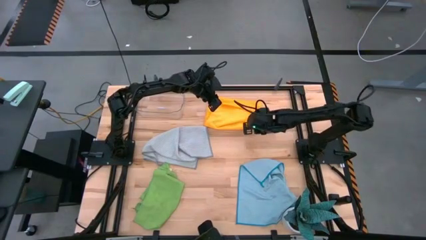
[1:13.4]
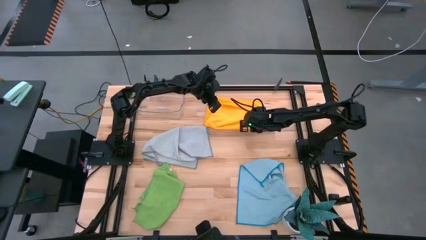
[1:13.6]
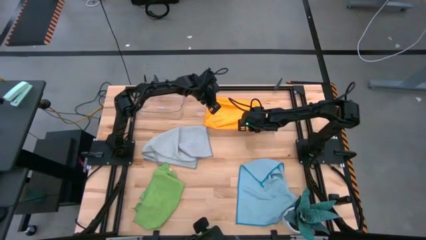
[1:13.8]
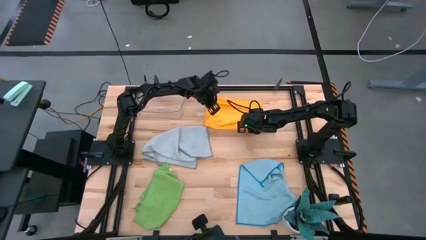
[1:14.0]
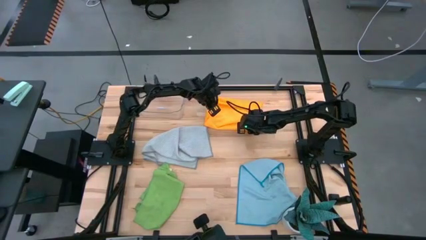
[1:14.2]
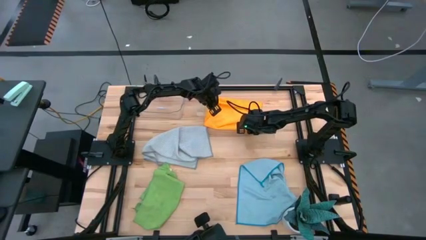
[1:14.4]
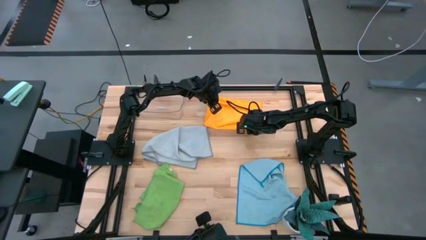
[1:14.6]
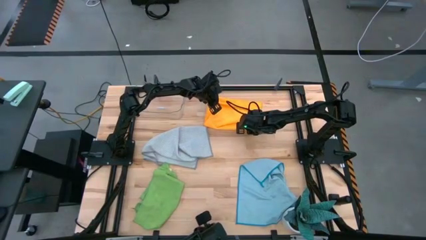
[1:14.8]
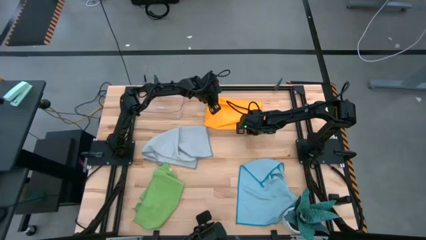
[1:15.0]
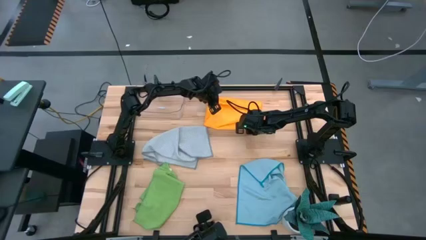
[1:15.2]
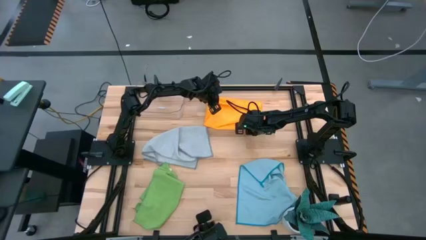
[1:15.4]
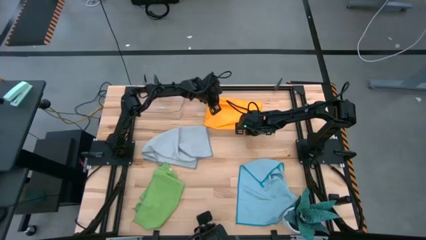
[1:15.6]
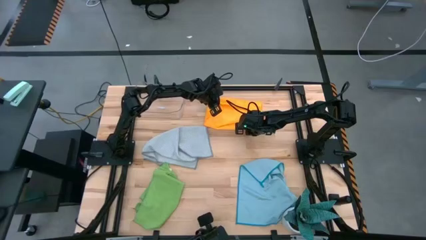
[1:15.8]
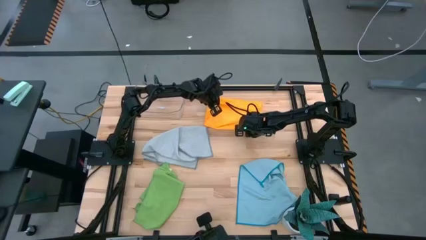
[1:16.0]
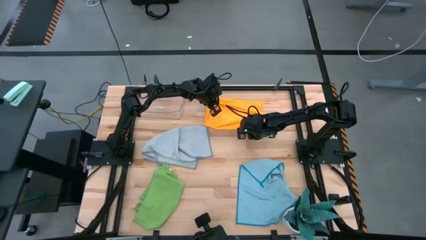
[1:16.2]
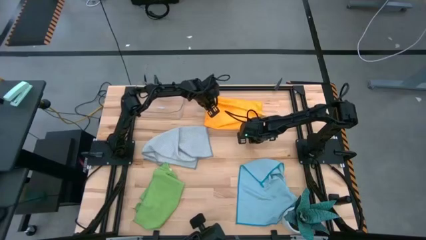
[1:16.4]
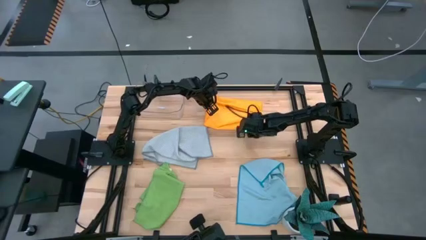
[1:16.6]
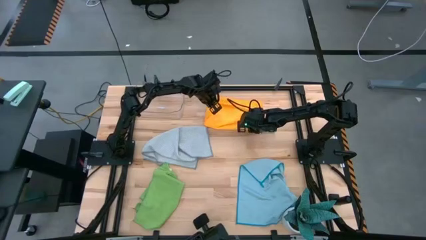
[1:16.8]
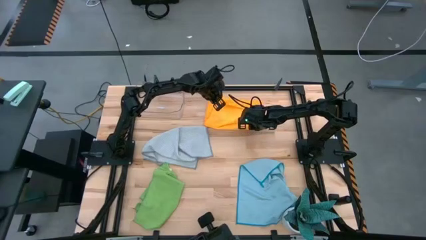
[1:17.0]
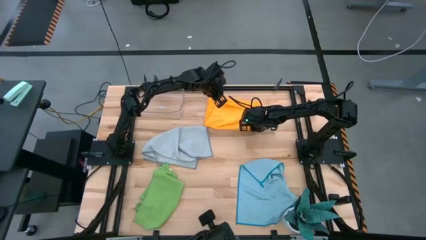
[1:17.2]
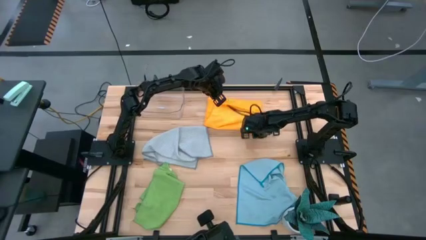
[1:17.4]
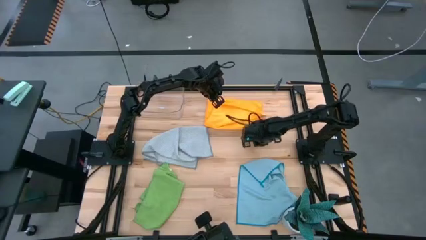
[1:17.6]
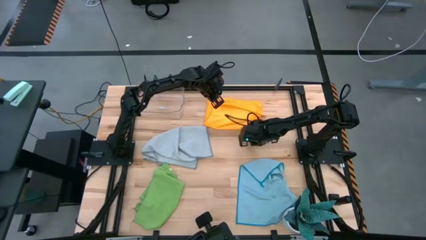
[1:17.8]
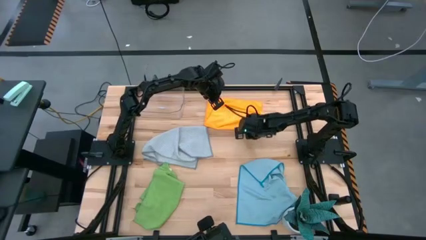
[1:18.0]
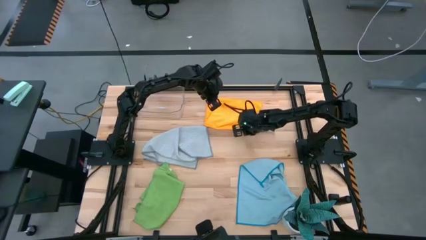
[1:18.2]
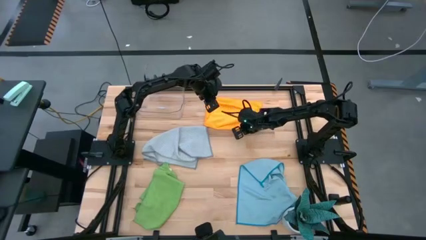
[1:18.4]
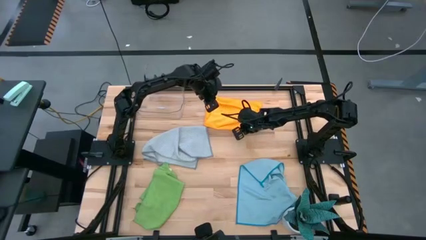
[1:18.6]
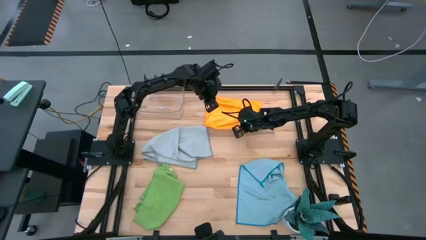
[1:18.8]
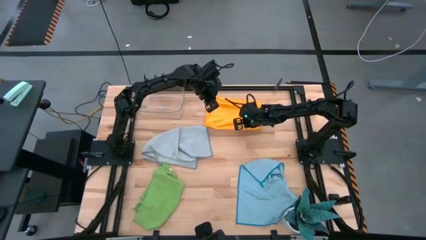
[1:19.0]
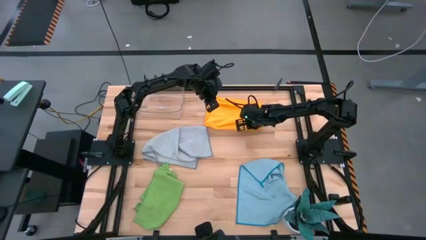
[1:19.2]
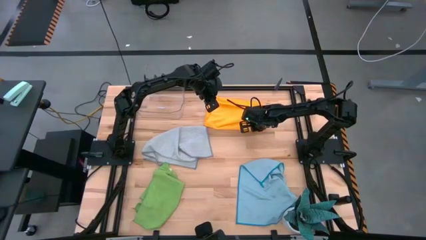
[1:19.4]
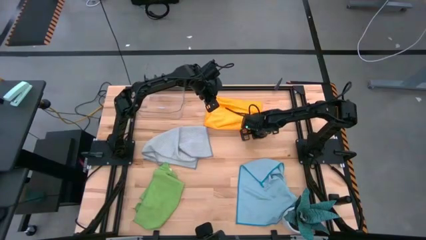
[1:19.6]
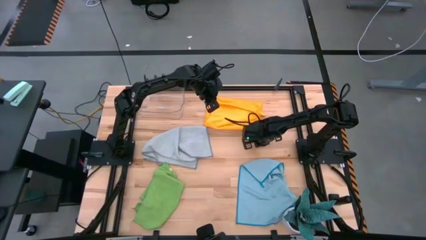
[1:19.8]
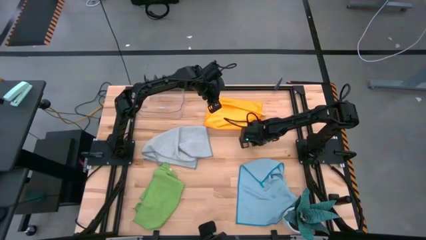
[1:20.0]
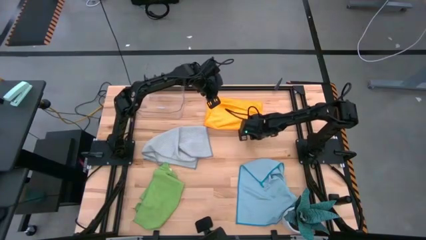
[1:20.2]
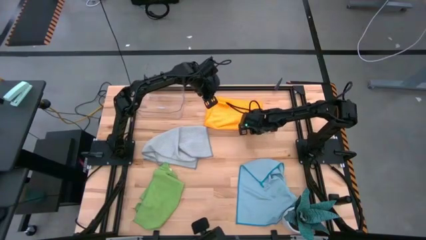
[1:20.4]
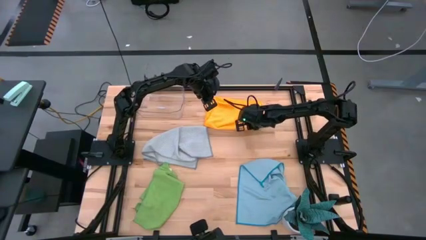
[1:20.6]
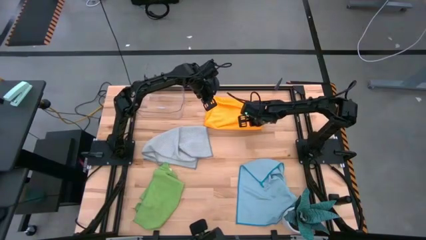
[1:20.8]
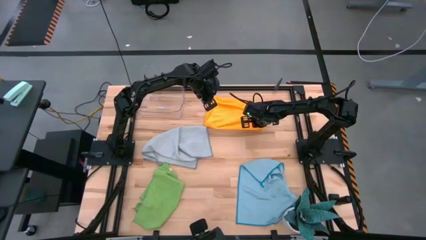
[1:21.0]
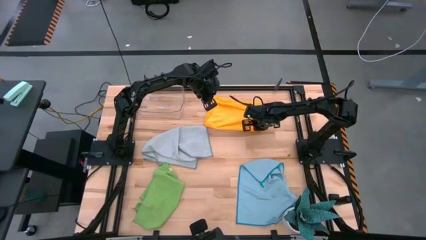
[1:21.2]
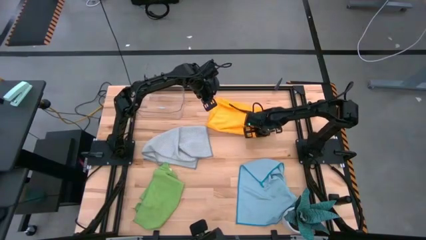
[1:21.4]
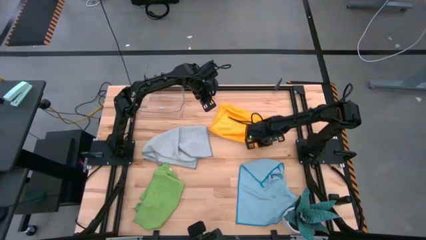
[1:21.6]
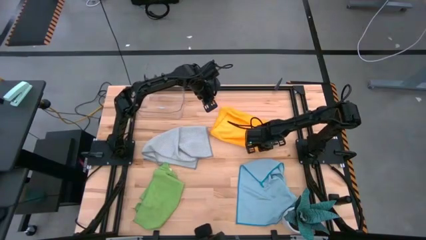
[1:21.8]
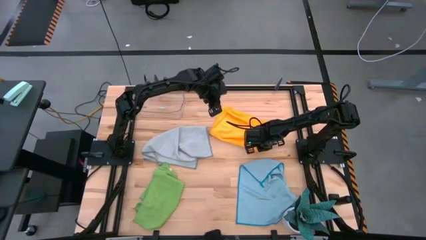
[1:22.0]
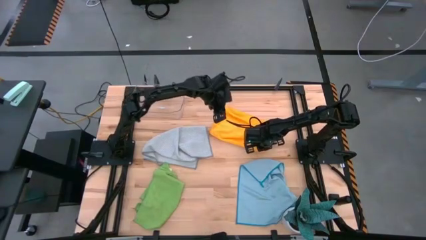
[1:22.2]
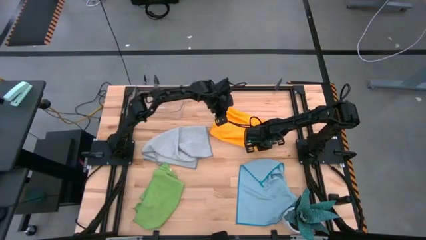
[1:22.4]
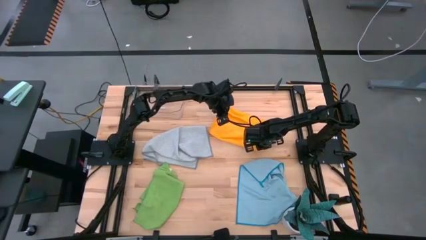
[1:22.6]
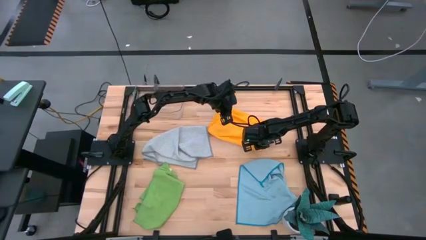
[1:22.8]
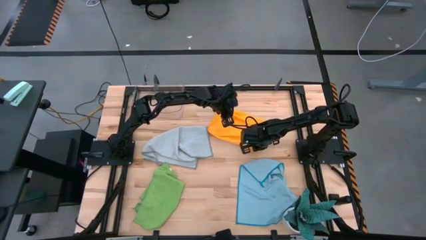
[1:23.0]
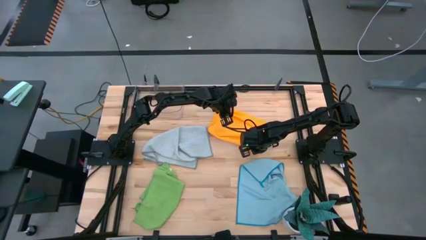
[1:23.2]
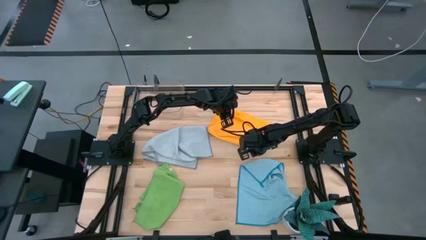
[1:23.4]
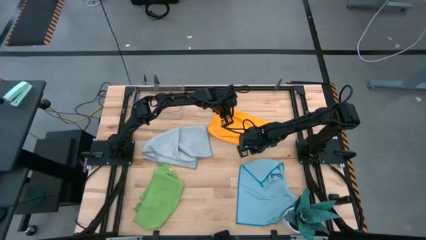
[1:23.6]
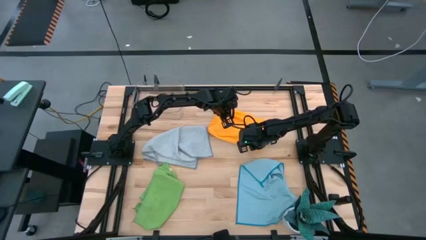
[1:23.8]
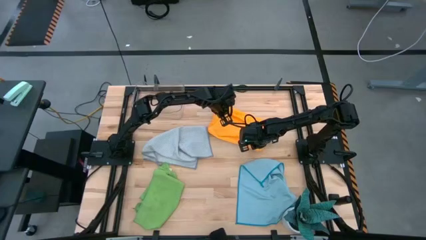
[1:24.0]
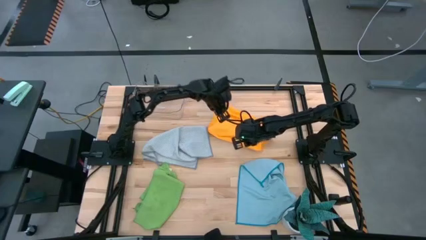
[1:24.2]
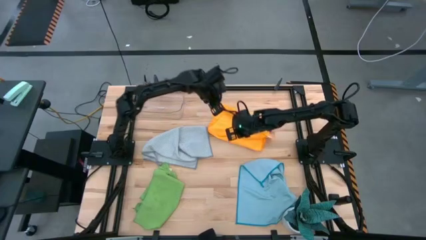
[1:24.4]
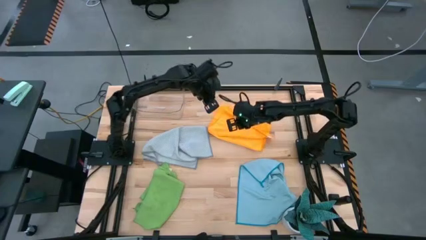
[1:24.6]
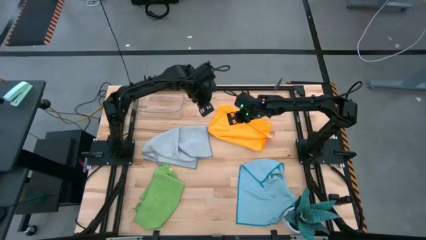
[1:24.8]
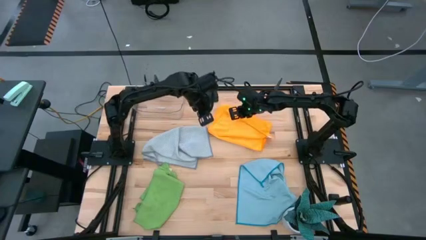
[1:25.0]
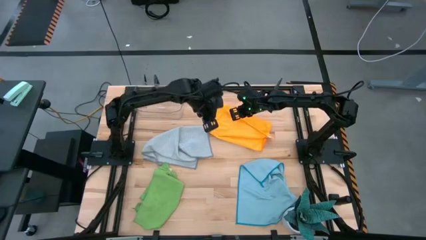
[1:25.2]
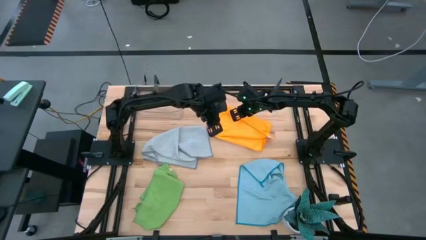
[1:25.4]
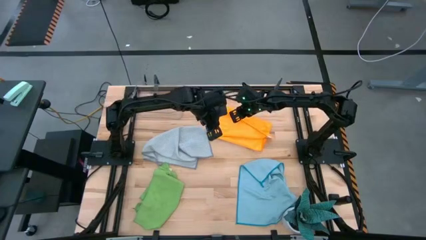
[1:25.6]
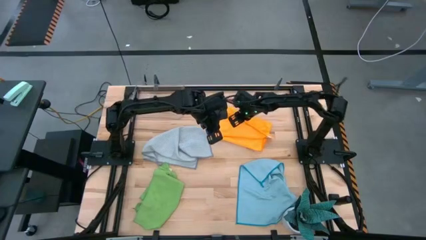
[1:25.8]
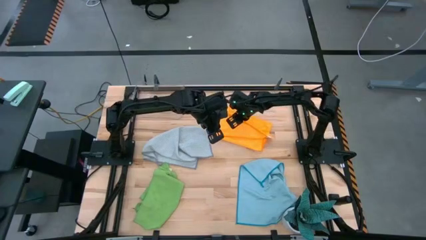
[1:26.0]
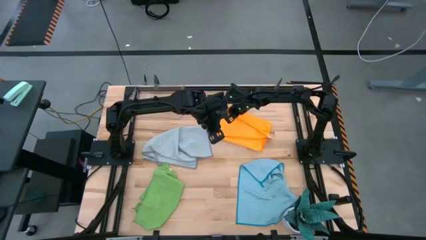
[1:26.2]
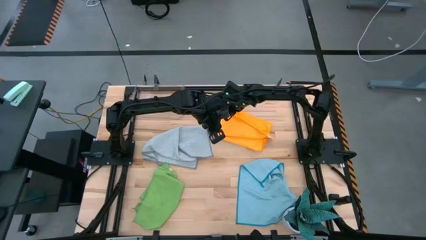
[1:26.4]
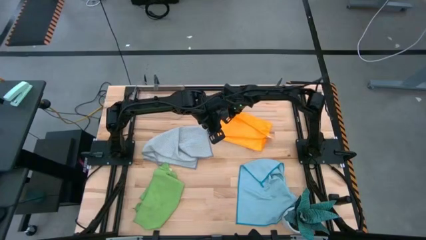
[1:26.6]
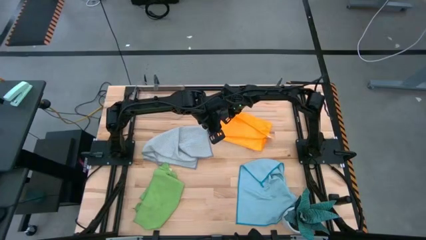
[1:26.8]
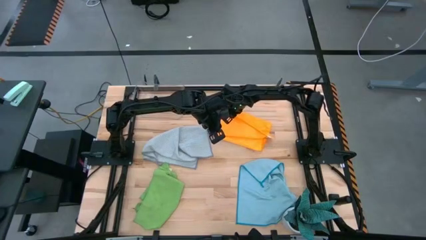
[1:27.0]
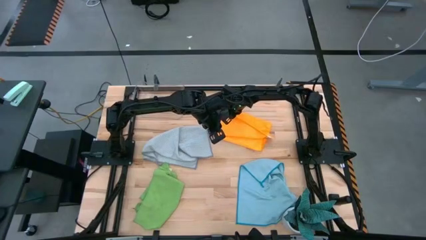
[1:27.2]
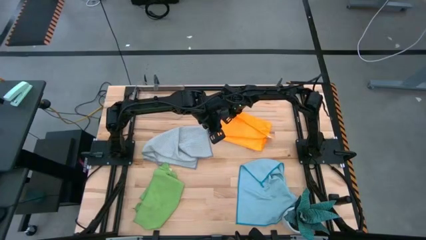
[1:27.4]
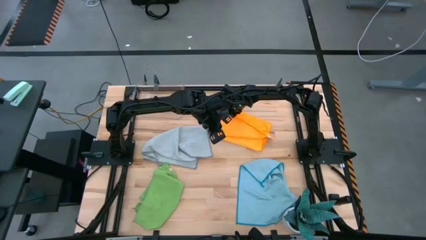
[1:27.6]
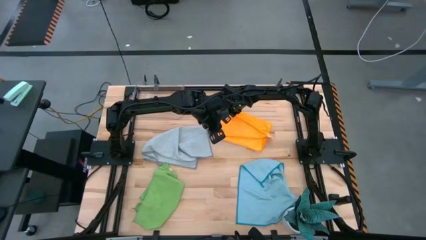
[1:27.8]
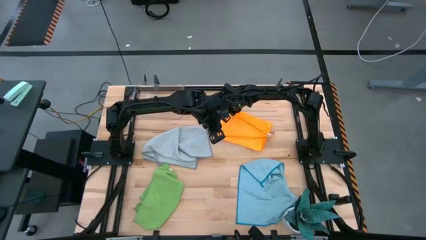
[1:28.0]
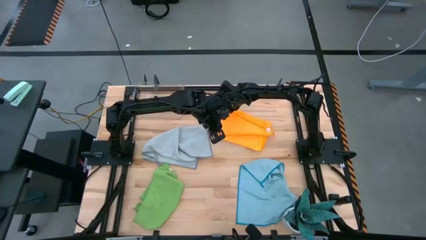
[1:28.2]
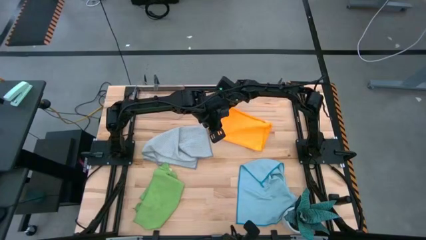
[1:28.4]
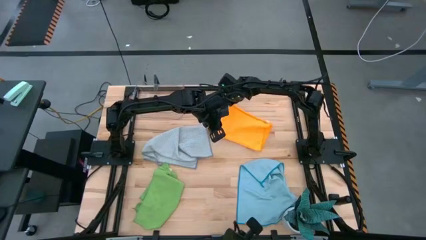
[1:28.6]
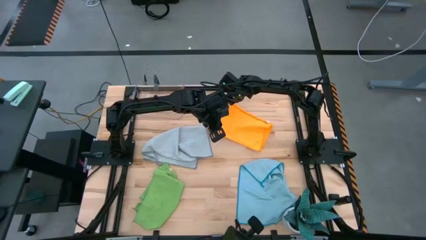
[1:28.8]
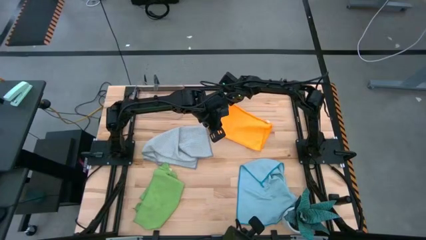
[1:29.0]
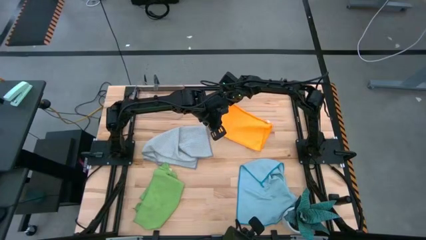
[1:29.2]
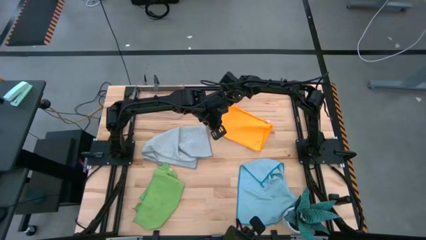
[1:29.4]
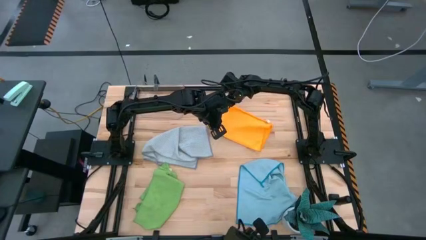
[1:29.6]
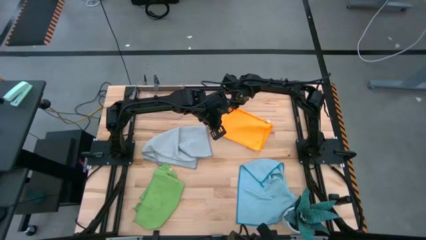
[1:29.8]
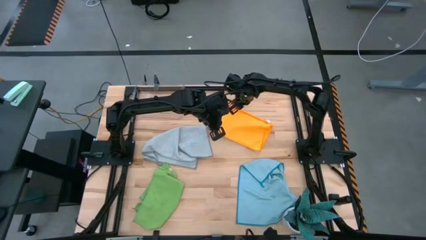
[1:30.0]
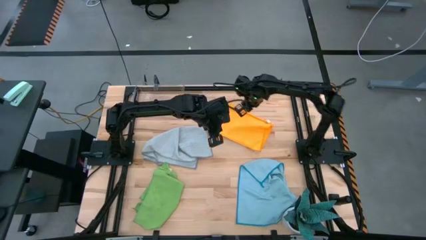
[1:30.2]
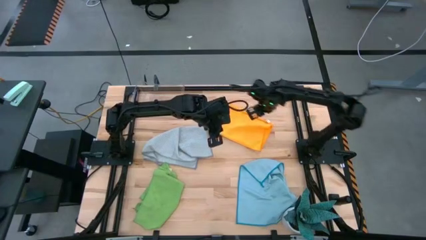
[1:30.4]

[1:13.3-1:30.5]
Task: Fold microfiber towels
Fold the orange microfiber cloth
